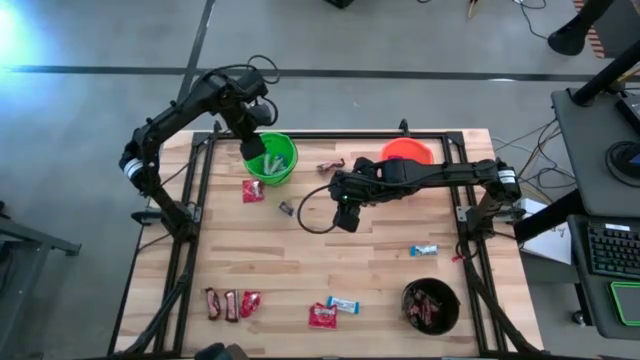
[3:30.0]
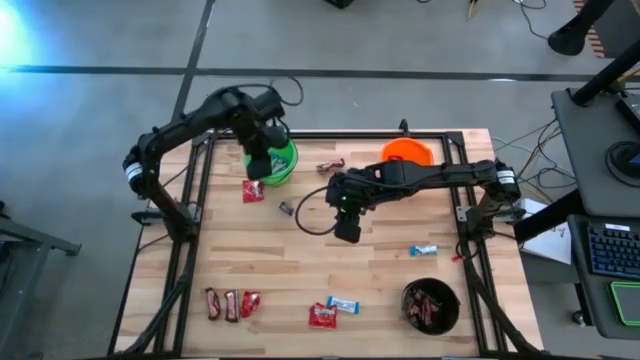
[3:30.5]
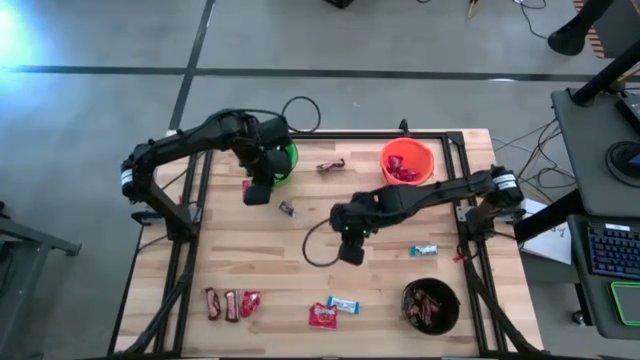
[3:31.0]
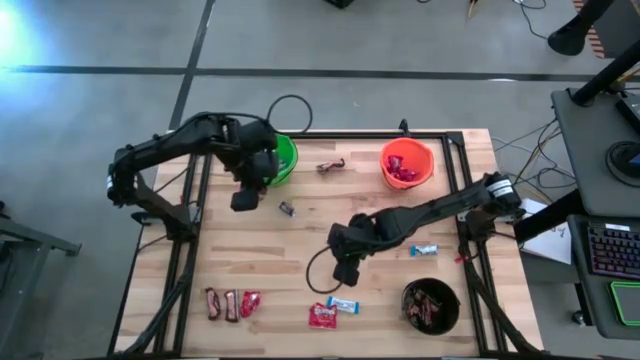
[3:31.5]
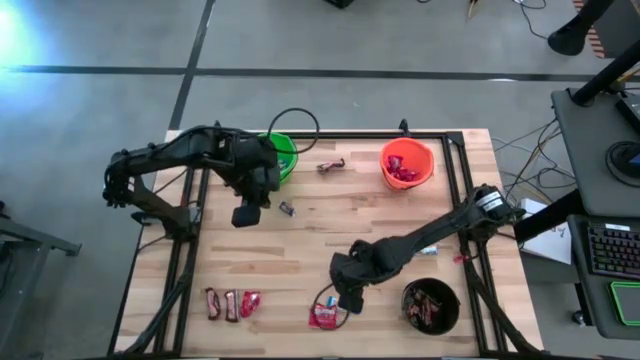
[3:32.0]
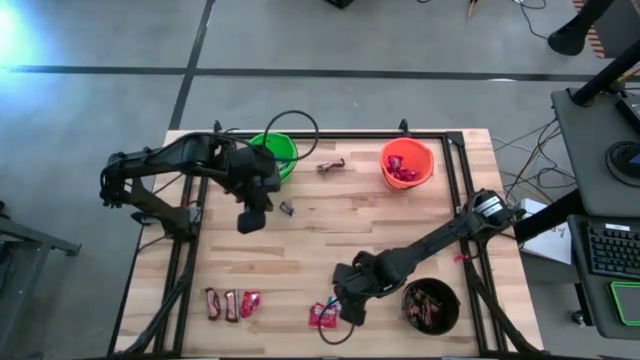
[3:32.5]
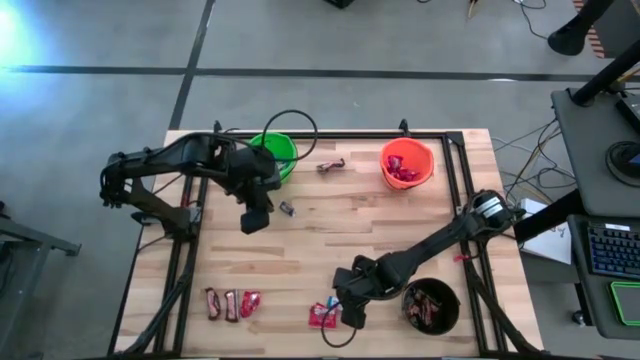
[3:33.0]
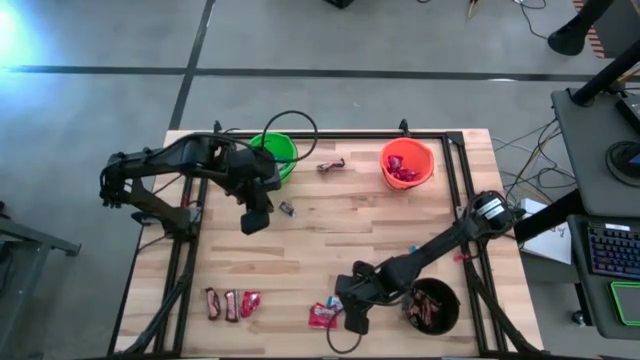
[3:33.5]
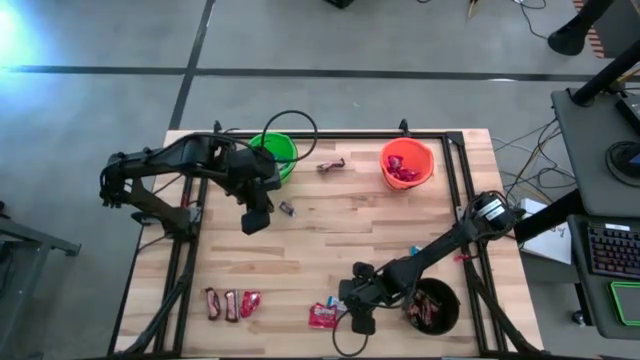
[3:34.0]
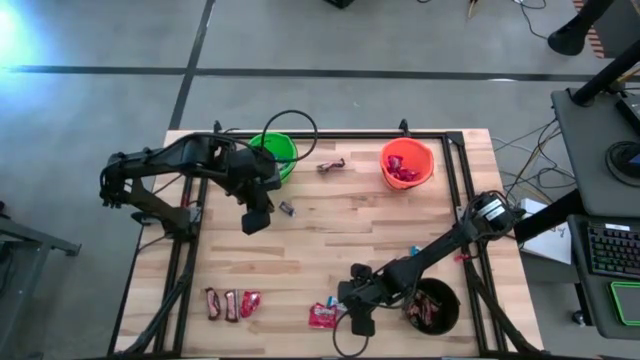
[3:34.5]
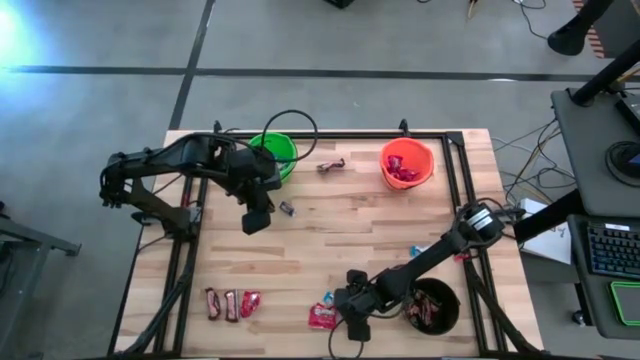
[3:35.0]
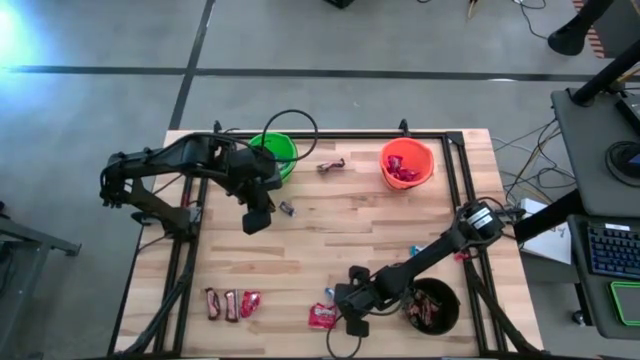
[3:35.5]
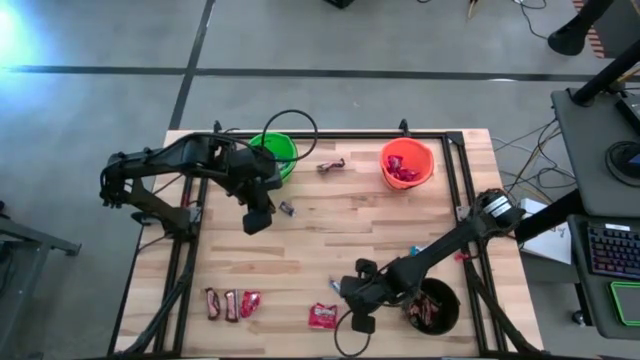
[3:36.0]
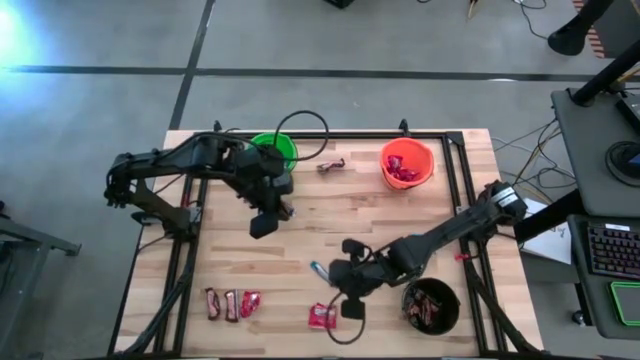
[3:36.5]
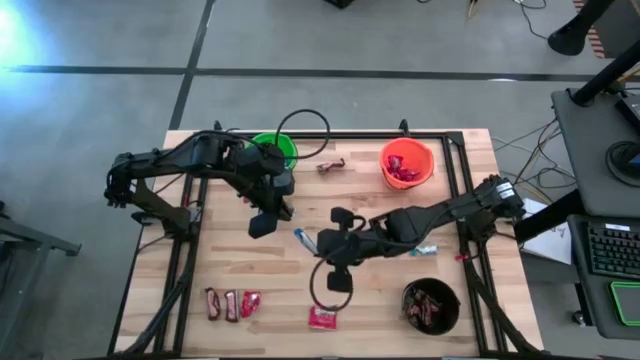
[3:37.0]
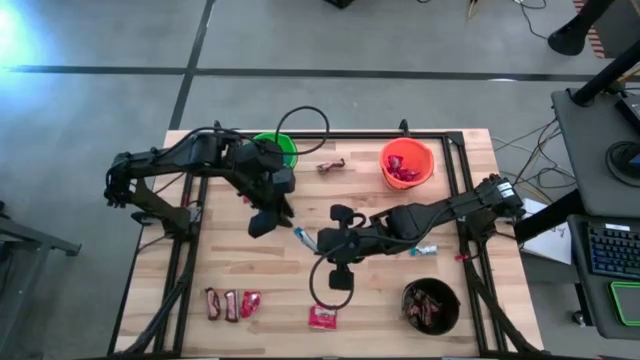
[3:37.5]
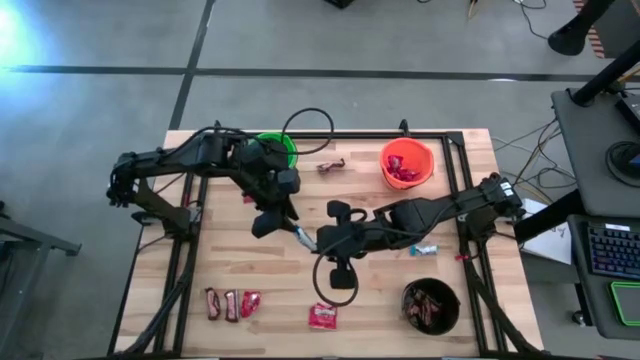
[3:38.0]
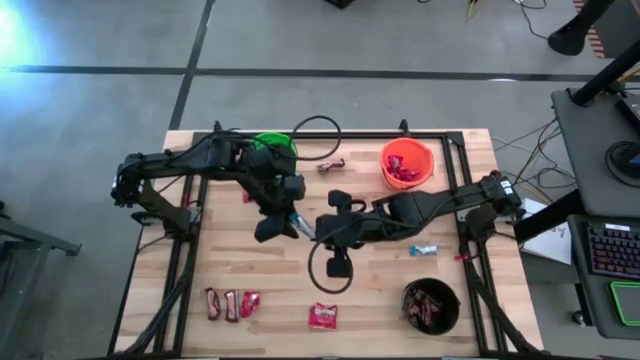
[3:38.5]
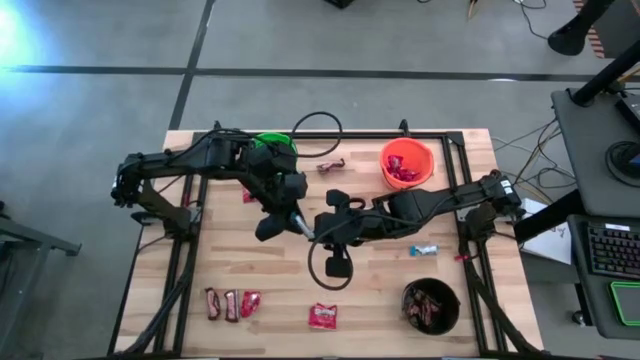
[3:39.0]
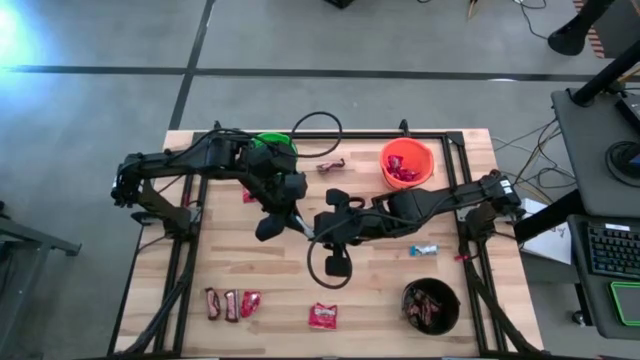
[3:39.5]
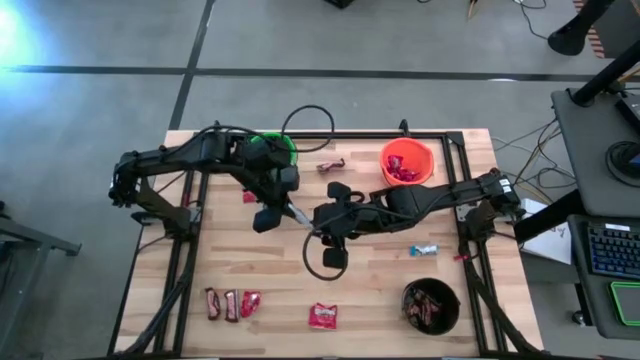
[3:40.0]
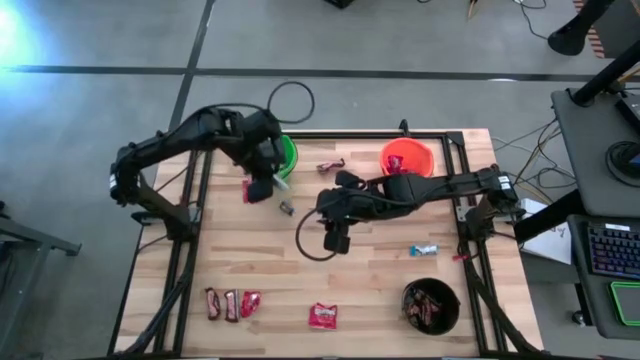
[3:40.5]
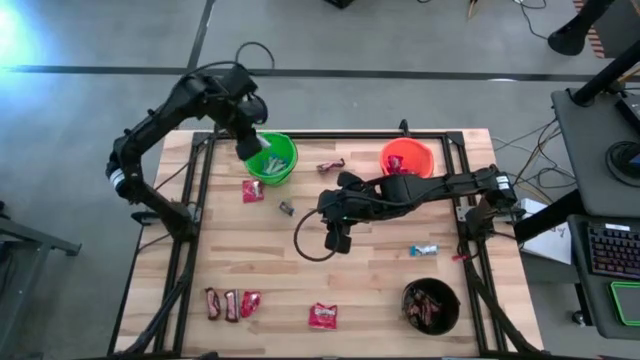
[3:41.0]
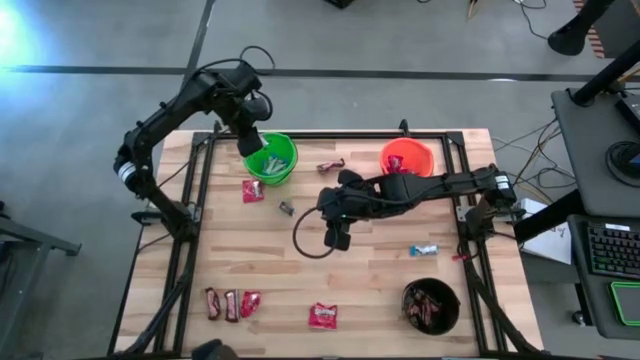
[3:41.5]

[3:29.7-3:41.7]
Task: Sort candy
Put the white candy into the green bucket

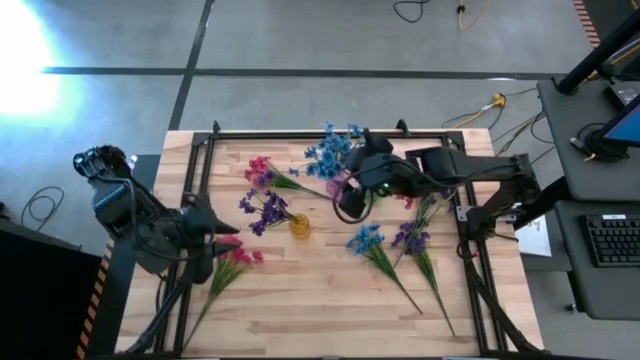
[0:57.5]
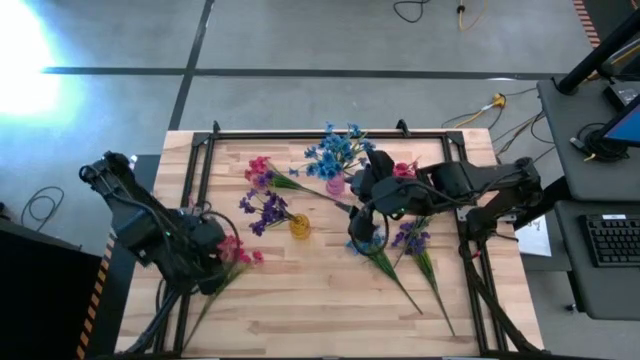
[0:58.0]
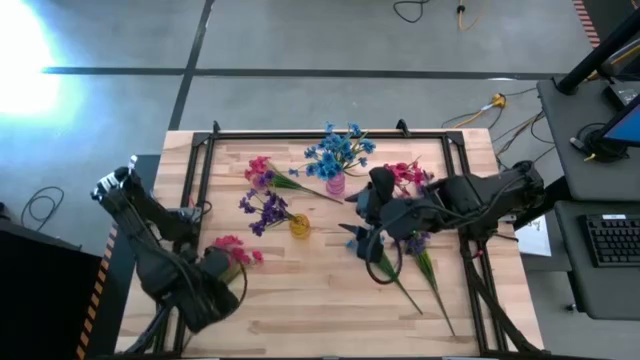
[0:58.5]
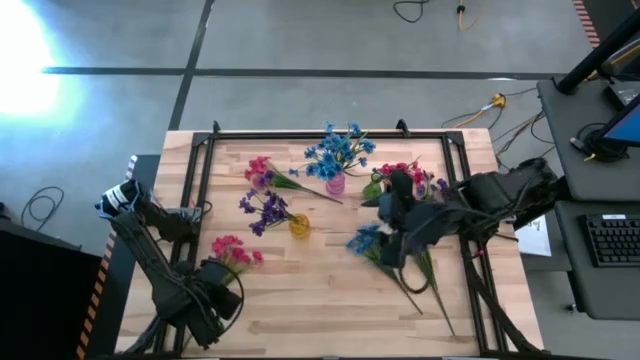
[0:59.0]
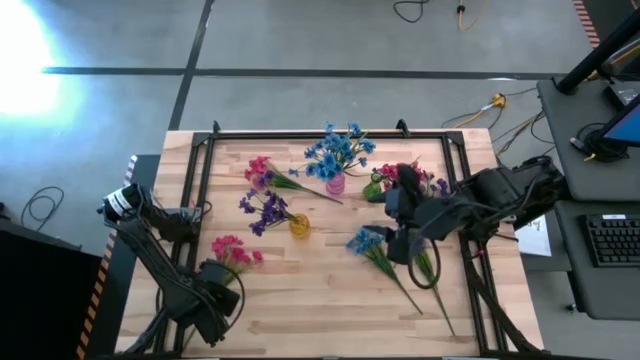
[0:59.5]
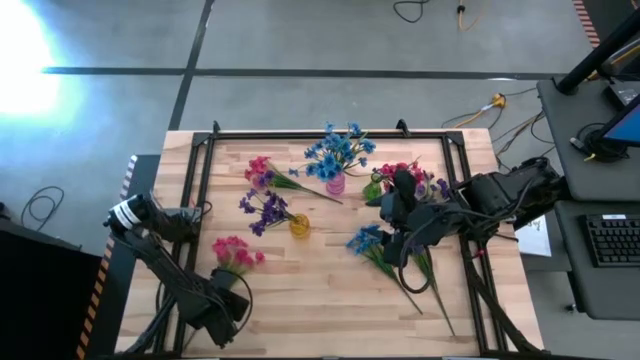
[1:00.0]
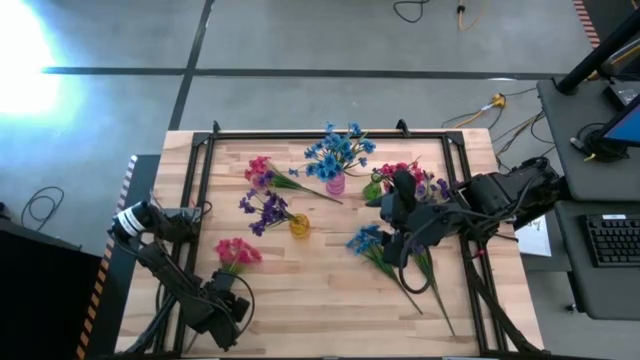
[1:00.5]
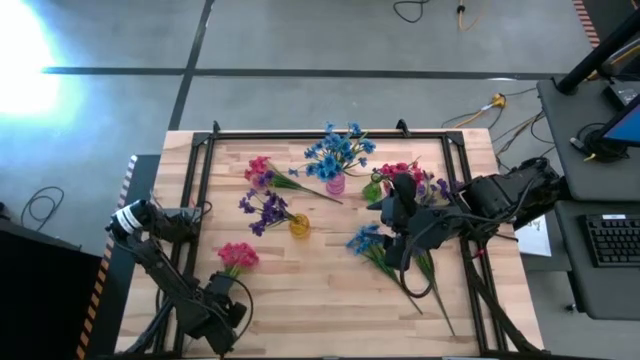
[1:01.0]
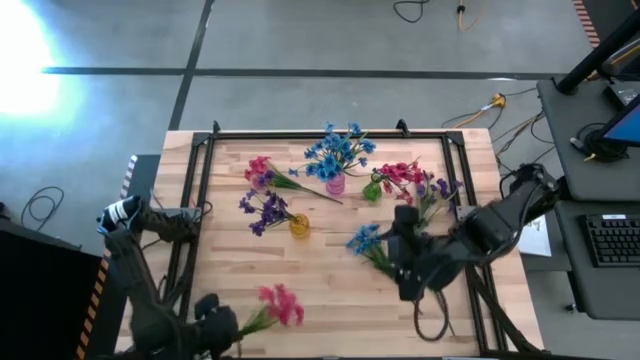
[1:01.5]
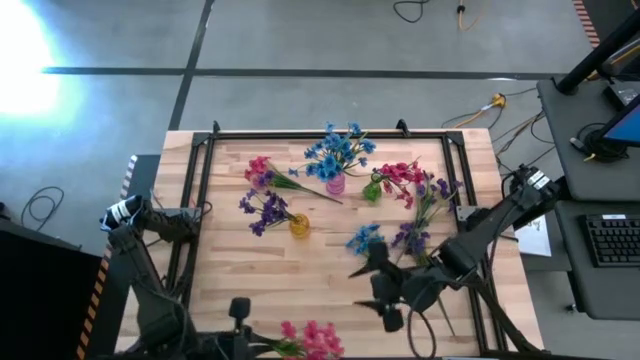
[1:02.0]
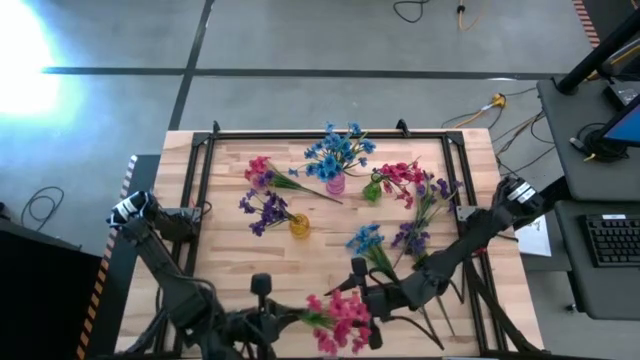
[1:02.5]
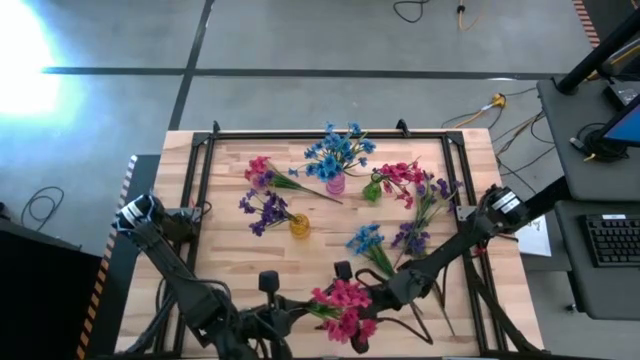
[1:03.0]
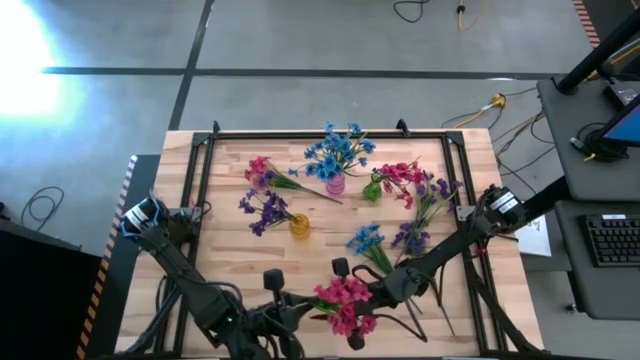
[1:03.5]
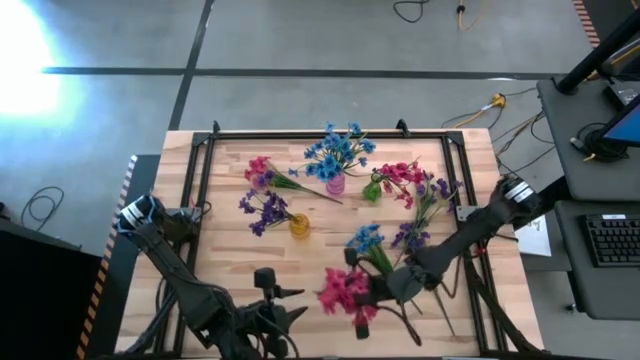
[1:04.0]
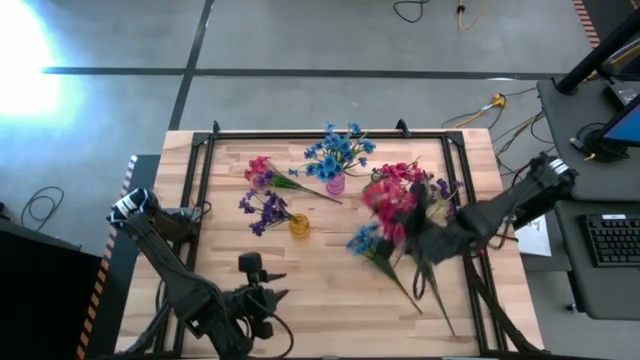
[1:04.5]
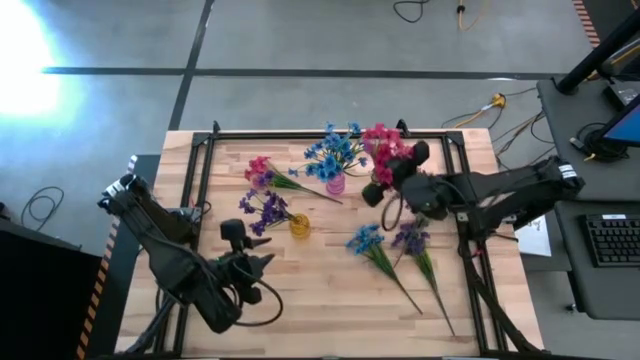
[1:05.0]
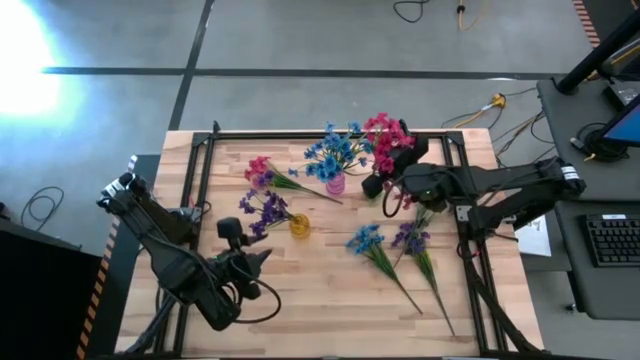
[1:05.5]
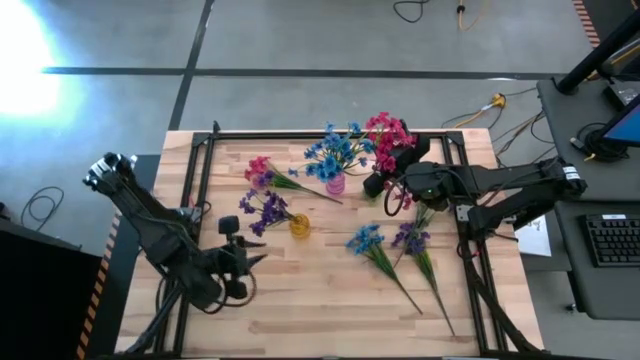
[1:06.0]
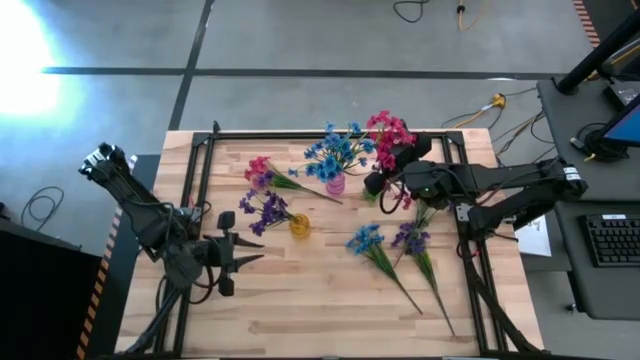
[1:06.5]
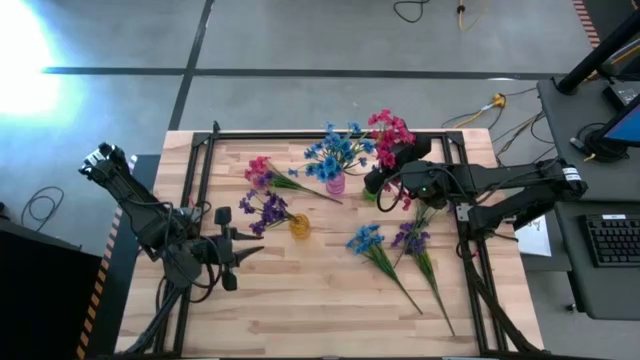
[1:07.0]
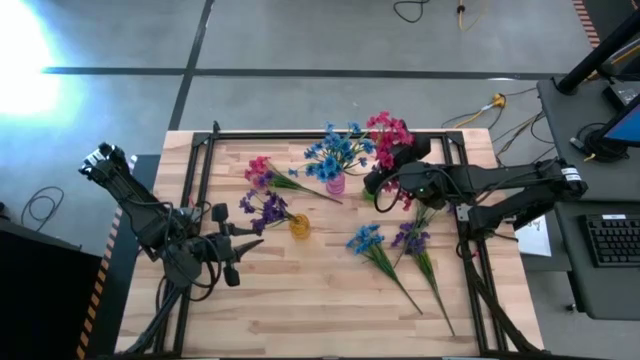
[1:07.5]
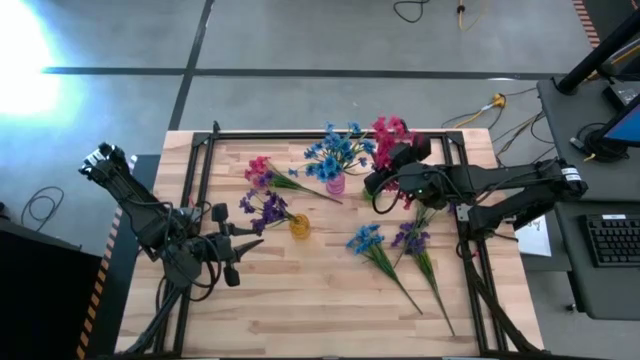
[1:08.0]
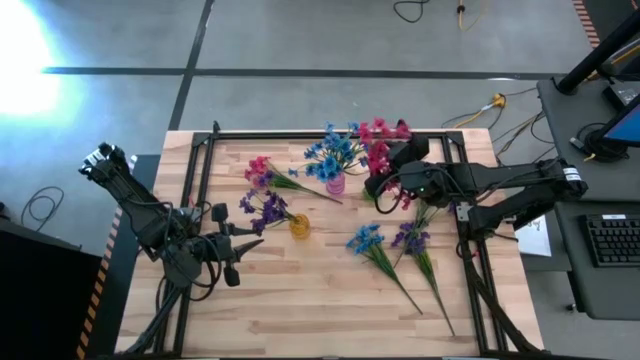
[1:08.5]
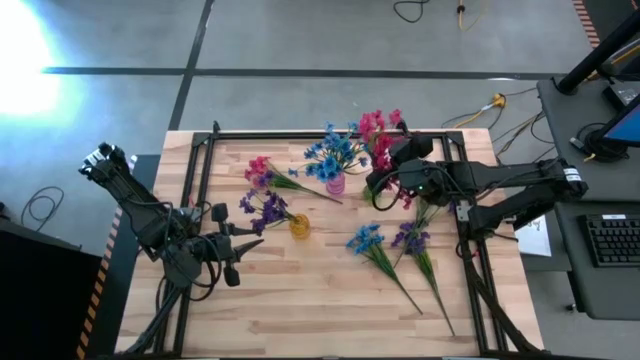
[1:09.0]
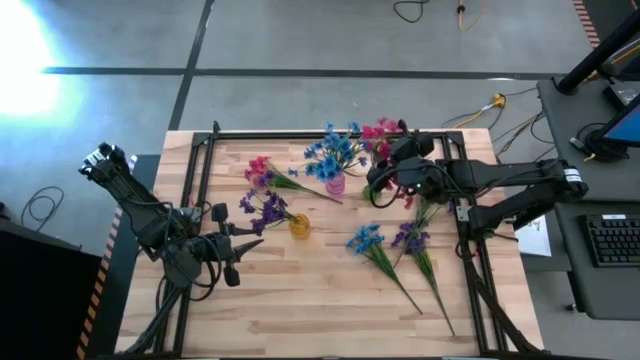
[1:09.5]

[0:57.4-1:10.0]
Task: Sort flowers into vase by color
Put the bottom pink flowers into the green vase
